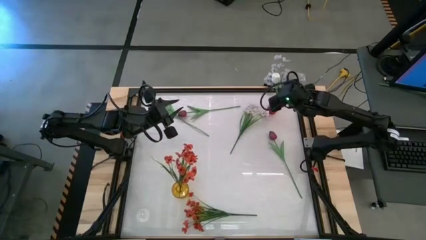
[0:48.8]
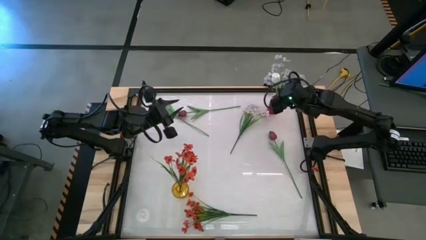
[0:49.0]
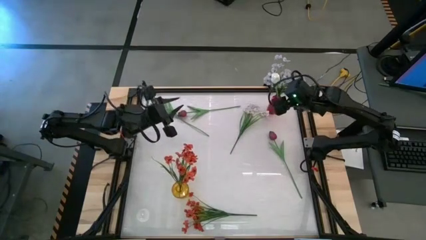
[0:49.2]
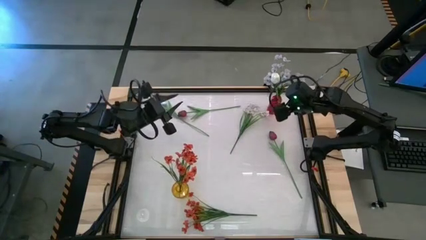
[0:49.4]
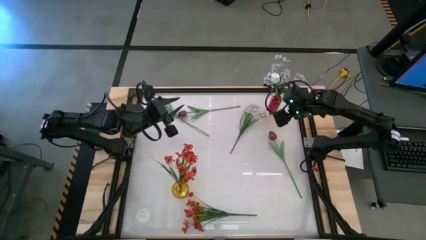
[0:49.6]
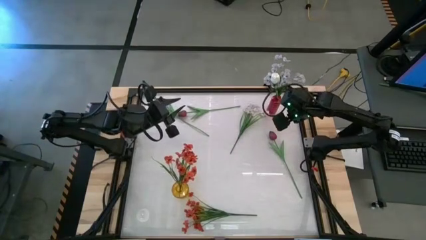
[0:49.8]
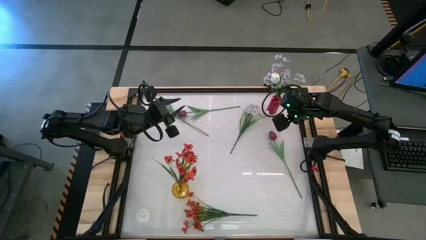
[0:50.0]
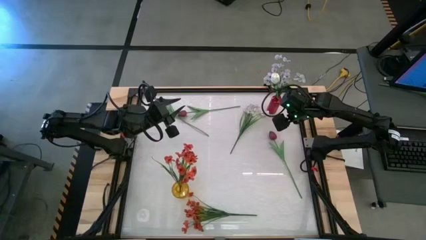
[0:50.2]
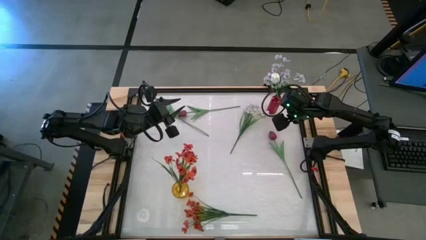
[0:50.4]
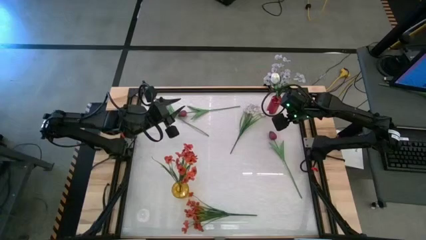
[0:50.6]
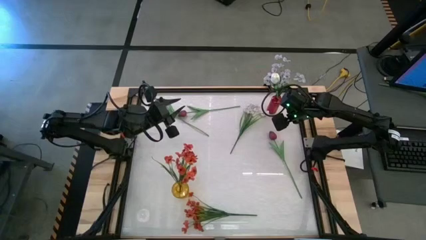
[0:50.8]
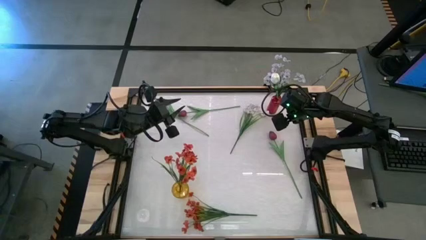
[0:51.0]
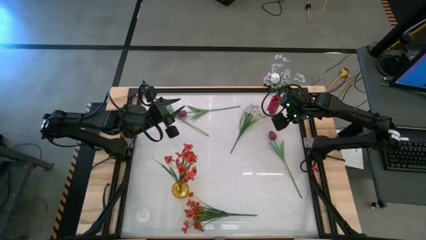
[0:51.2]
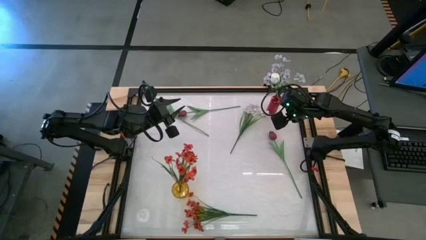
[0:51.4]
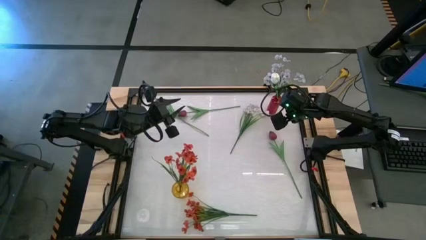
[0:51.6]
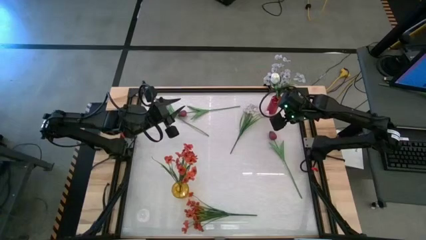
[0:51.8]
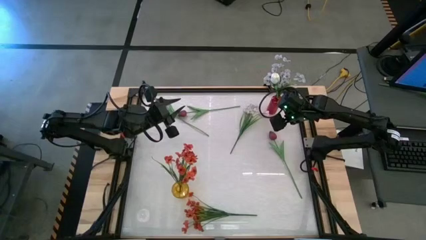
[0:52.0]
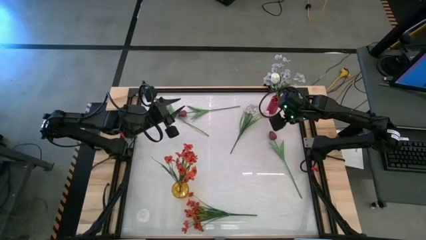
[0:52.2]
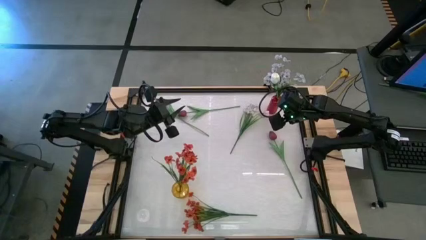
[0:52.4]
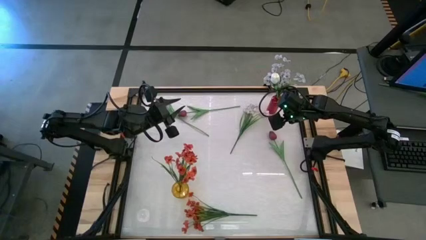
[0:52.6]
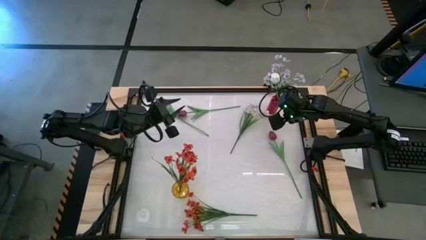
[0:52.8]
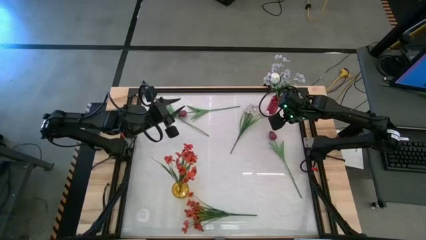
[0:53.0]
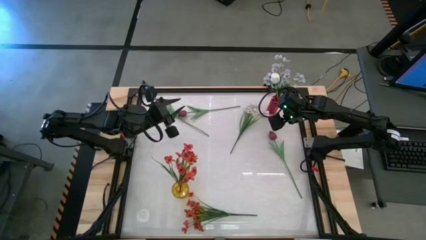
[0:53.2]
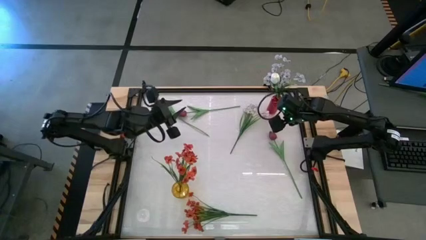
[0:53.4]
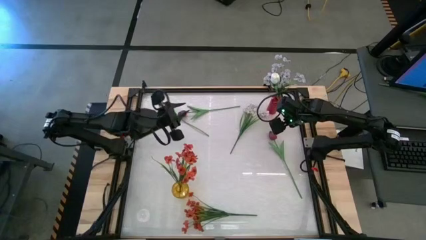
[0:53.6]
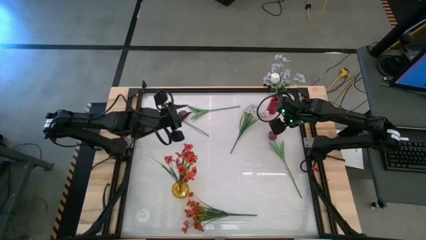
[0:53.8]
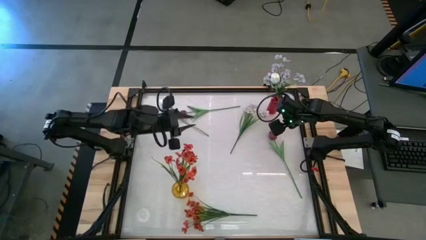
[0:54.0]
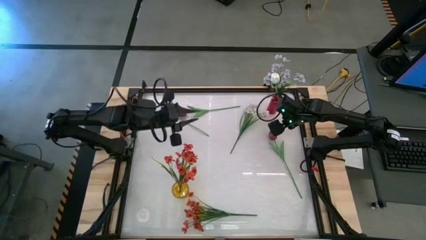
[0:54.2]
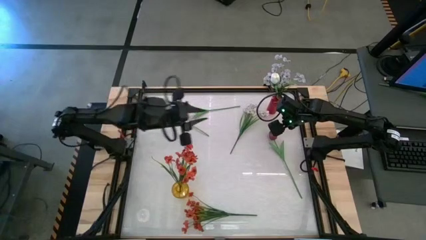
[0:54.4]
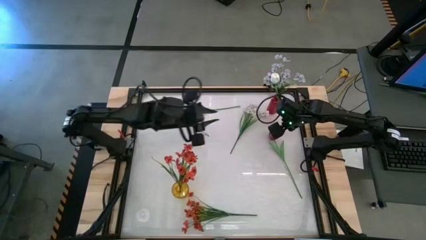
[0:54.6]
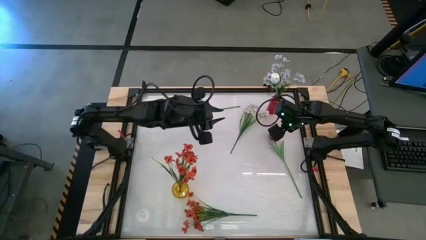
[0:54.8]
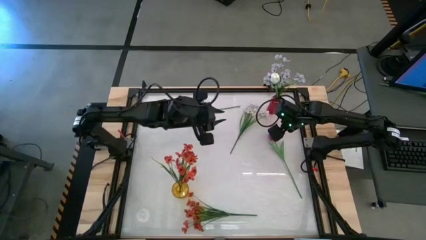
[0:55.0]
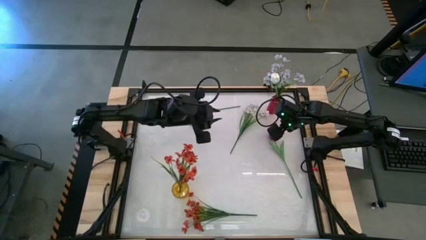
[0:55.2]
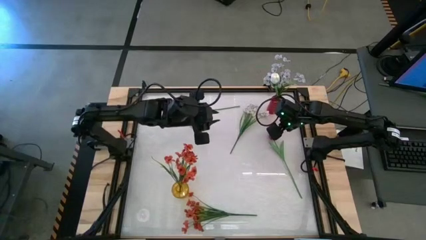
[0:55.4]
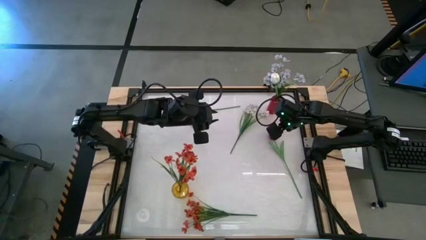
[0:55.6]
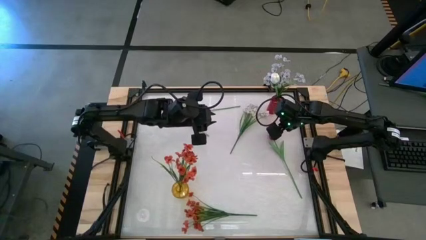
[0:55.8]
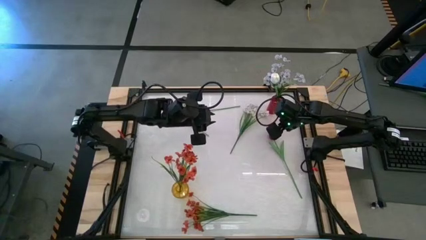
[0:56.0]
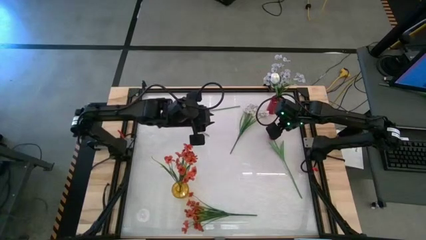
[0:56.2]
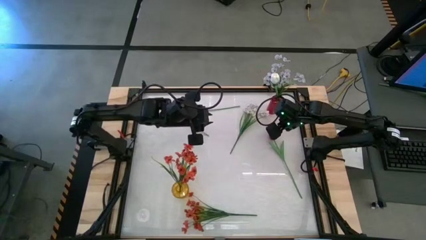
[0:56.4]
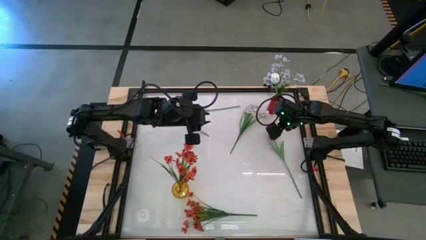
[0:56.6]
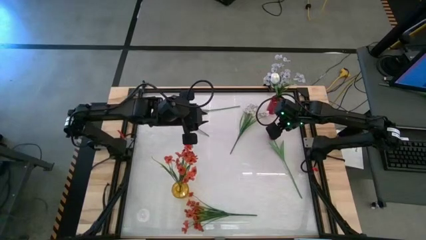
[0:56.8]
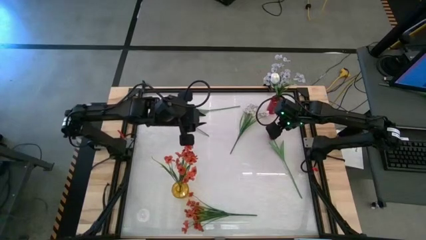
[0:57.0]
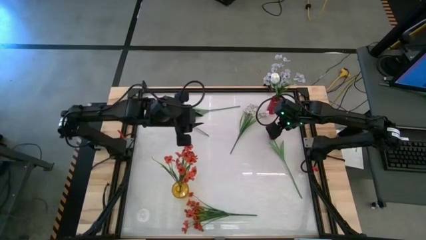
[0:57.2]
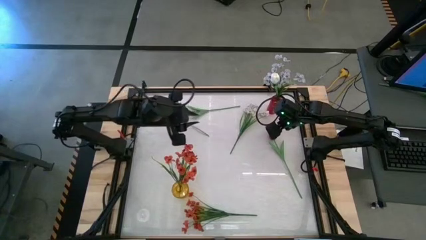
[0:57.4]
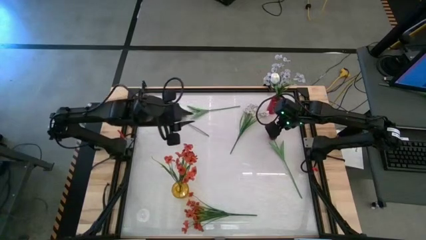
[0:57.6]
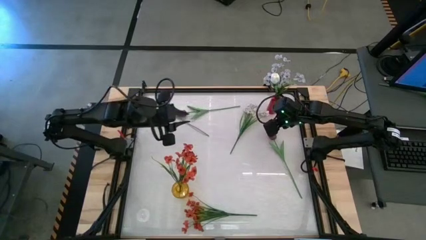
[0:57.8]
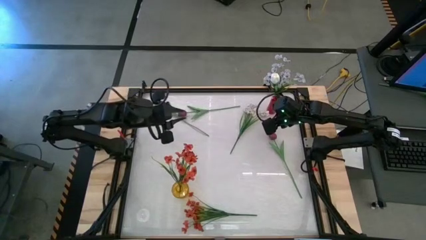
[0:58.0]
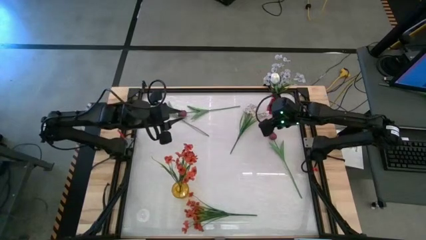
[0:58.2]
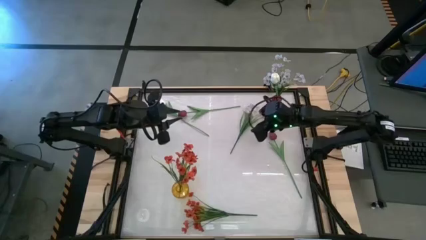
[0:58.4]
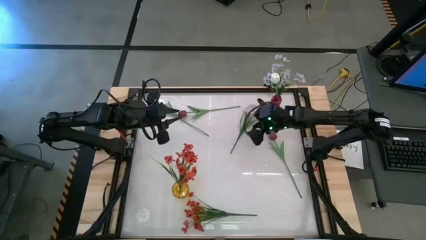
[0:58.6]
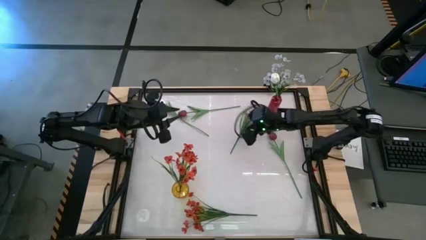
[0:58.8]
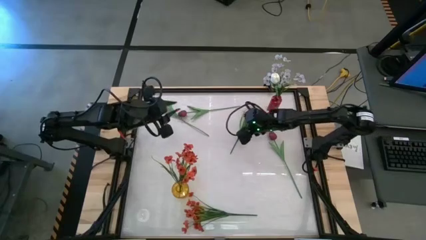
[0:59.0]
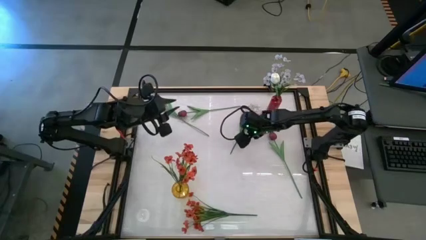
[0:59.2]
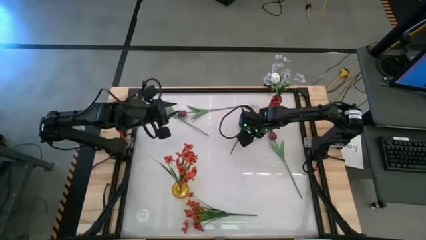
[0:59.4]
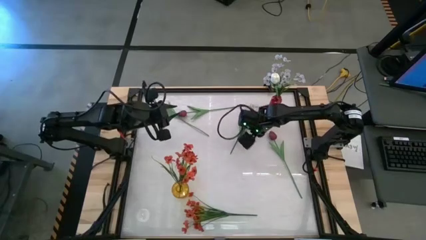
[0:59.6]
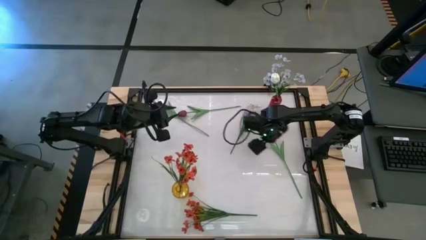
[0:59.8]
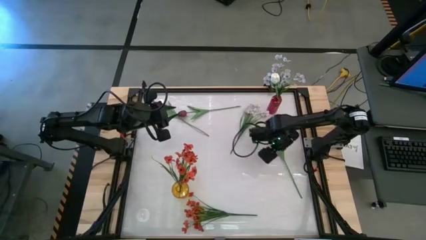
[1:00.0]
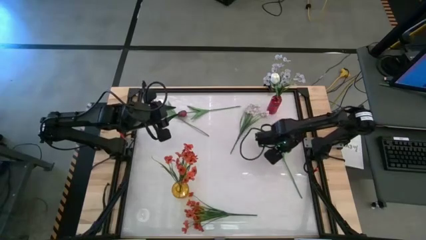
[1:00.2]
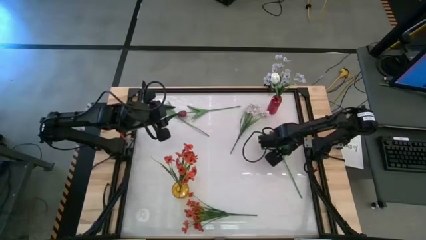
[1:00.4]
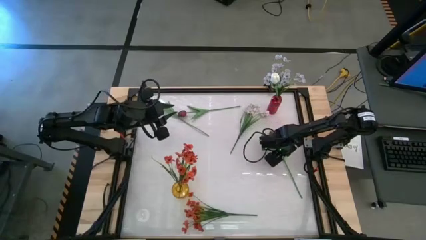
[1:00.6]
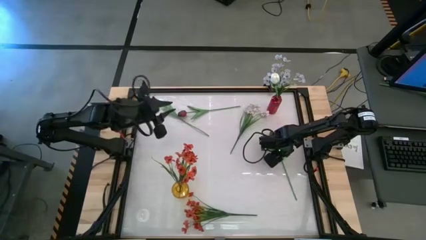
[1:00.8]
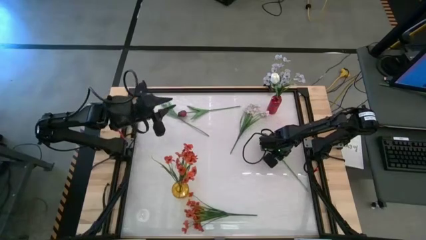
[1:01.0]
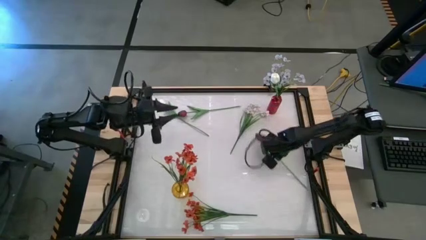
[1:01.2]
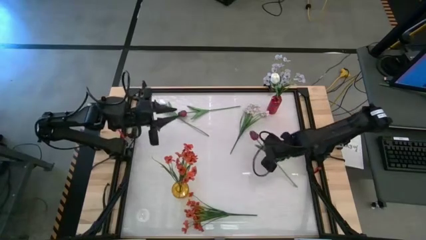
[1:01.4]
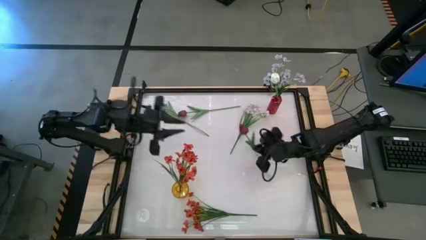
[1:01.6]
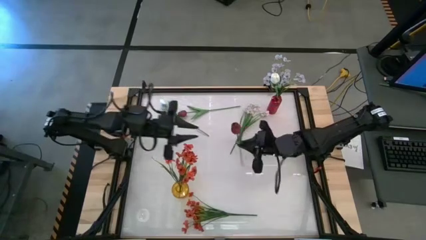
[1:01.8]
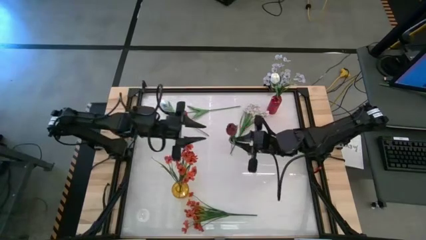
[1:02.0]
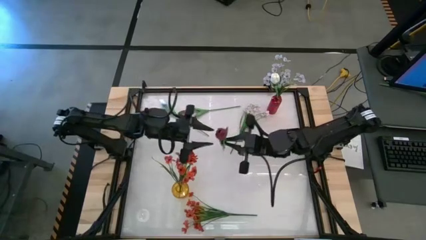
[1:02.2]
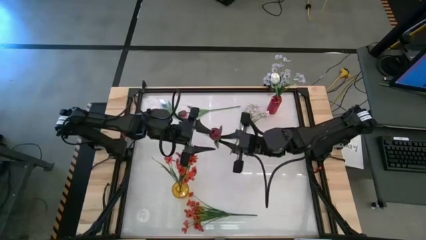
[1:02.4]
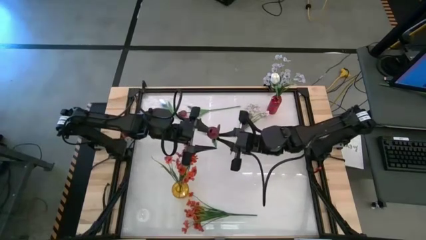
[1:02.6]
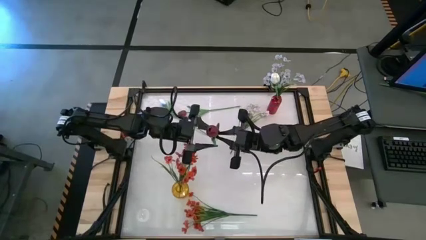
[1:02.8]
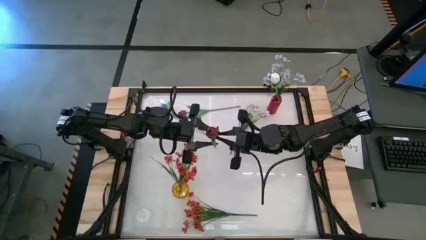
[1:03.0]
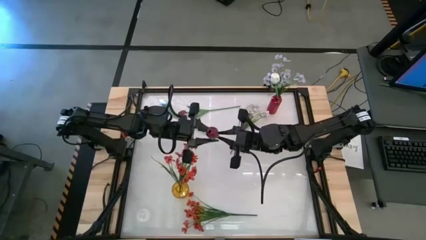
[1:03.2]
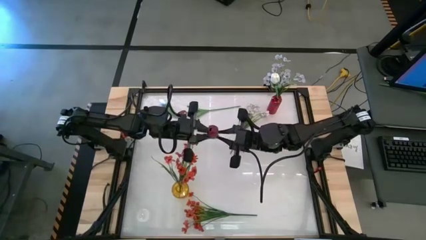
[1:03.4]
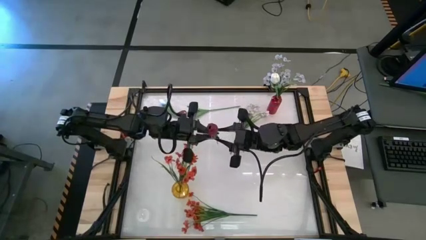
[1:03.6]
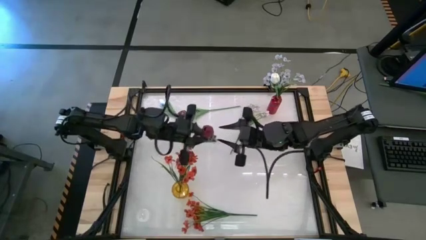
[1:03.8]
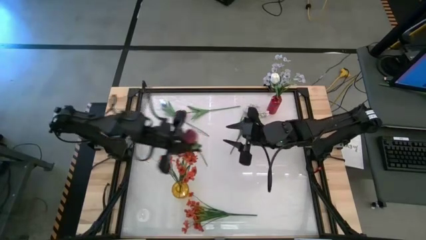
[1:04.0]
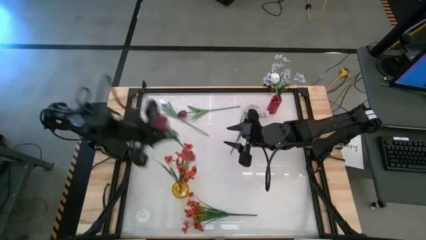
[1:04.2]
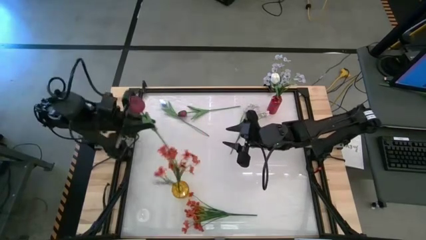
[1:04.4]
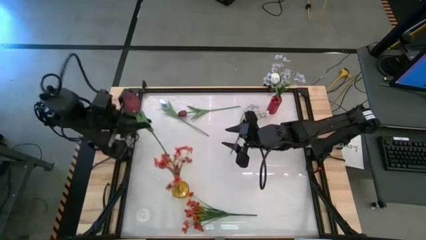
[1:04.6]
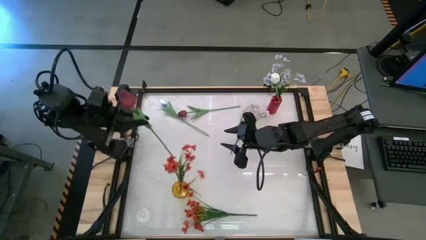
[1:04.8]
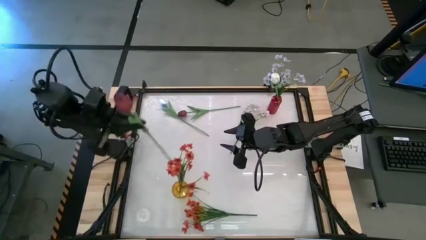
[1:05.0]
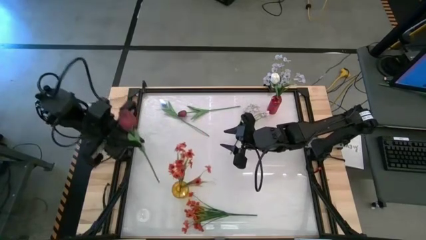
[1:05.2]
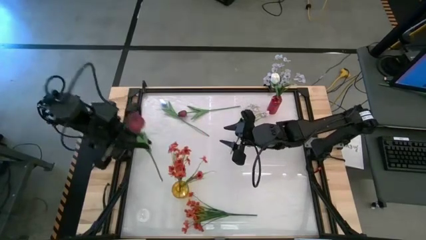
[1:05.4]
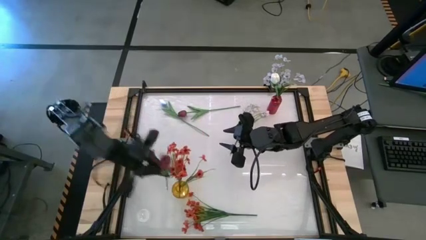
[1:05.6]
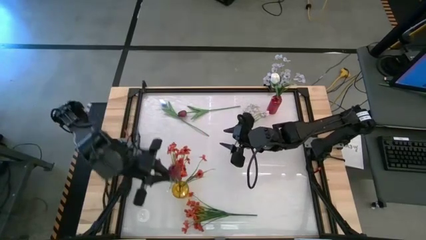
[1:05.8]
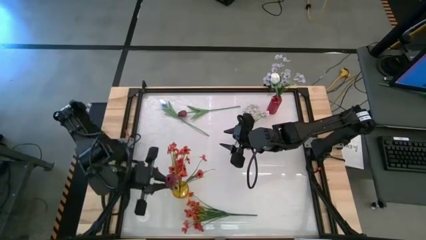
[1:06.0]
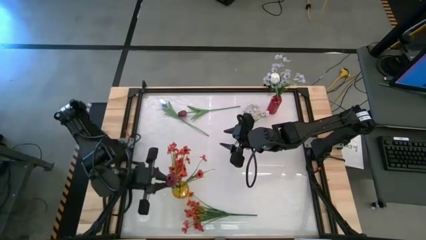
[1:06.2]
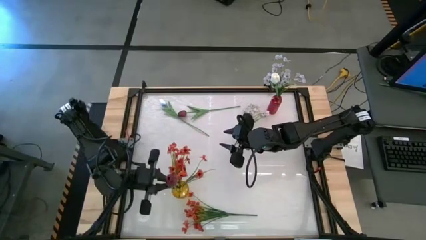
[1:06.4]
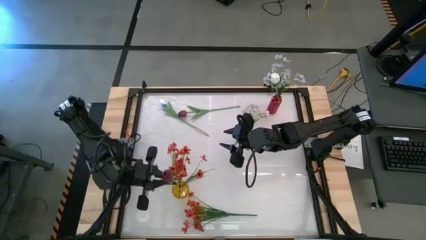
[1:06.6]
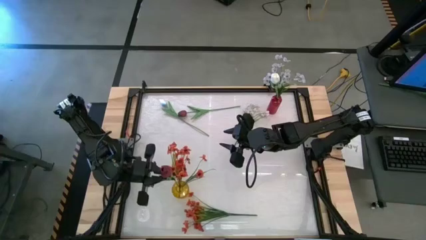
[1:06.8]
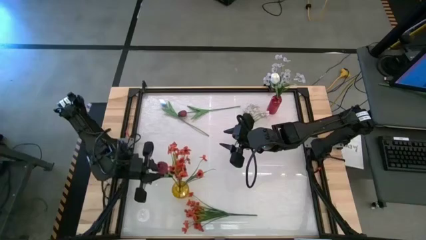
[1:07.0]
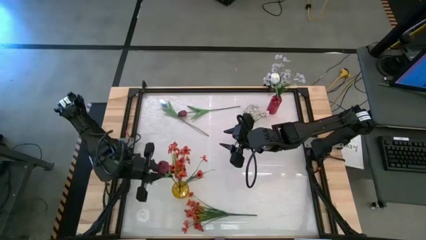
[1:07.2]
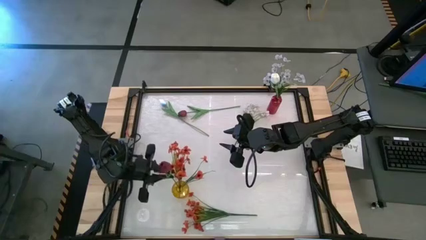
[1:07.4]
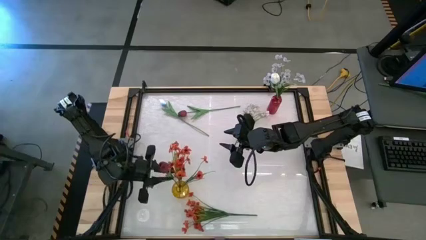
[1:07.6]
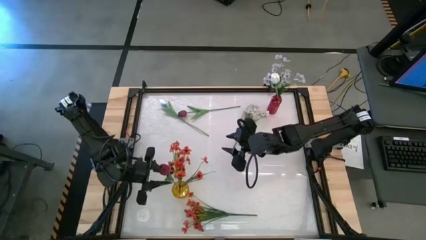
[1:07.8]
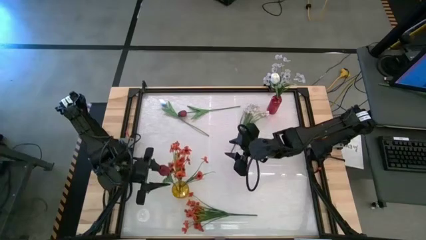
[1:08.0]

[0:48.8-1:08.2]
Task: Sort flowers into vase by color
Put the bottom red tulip into the yellow vase
